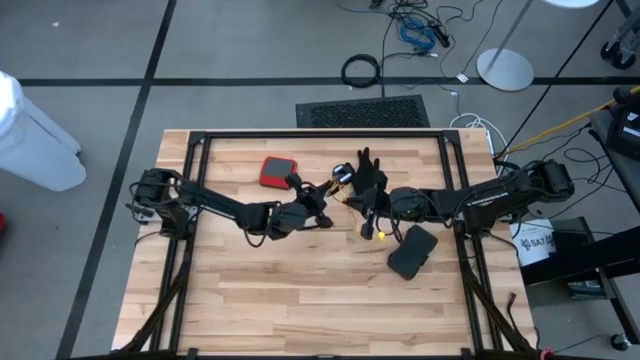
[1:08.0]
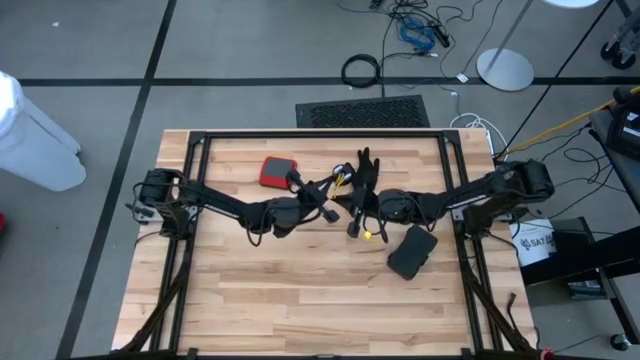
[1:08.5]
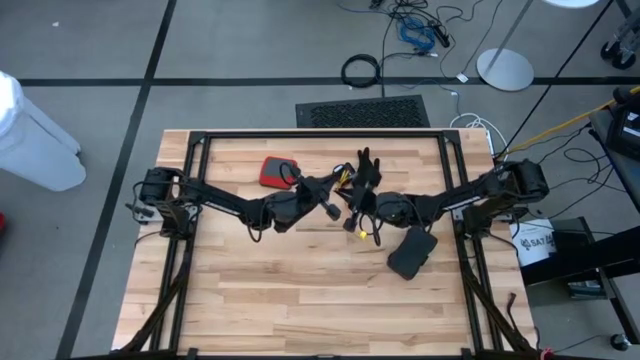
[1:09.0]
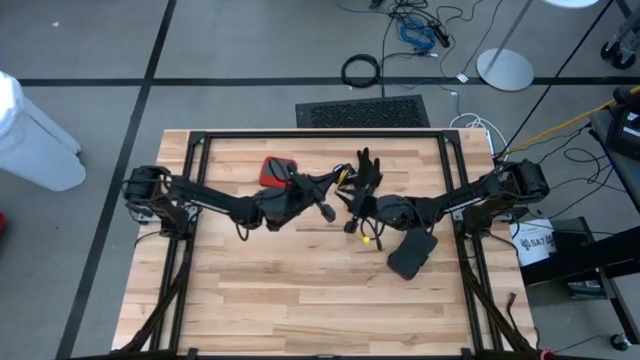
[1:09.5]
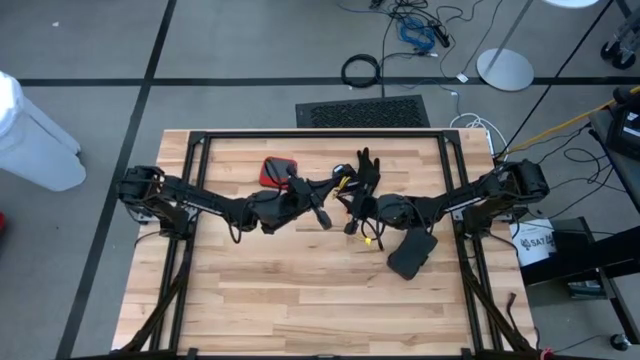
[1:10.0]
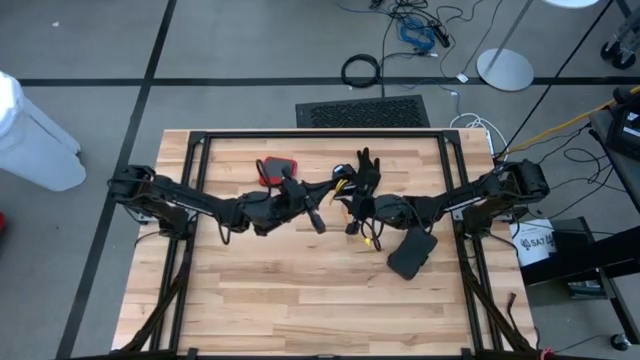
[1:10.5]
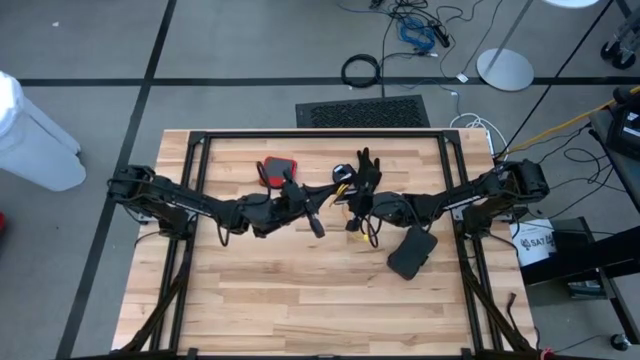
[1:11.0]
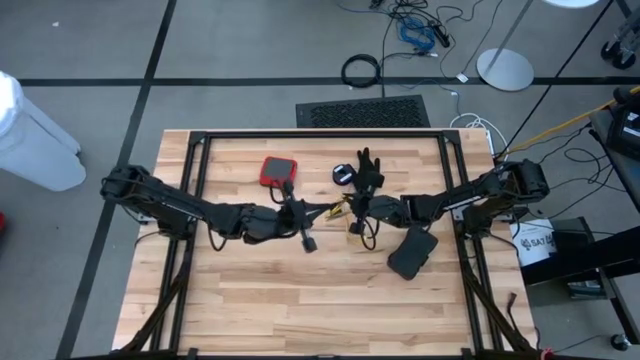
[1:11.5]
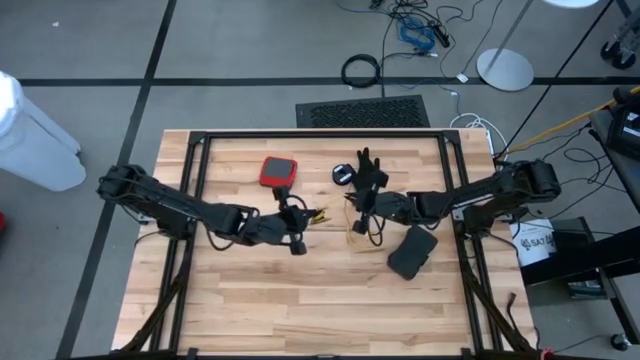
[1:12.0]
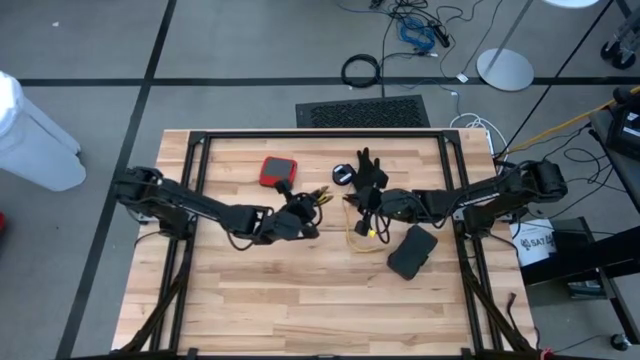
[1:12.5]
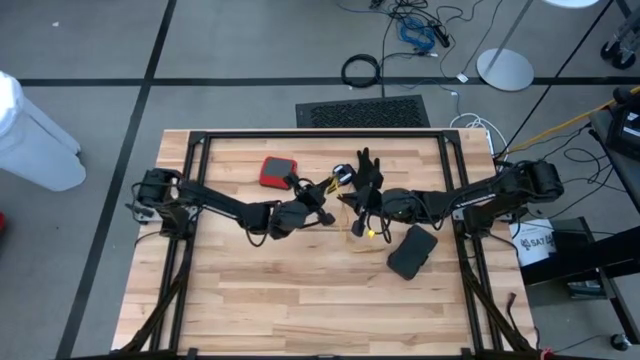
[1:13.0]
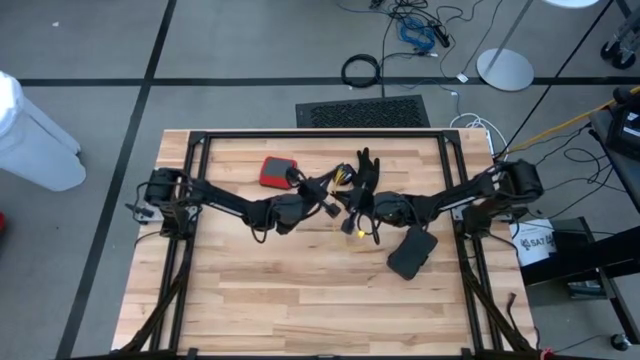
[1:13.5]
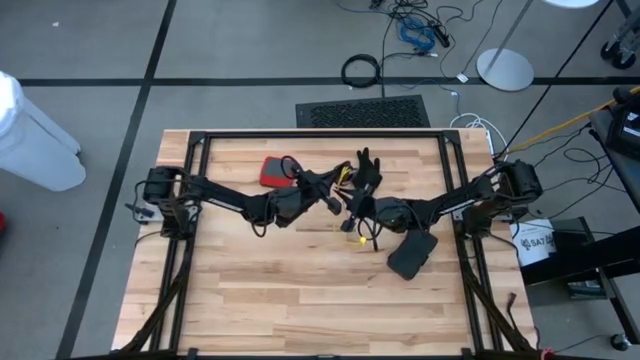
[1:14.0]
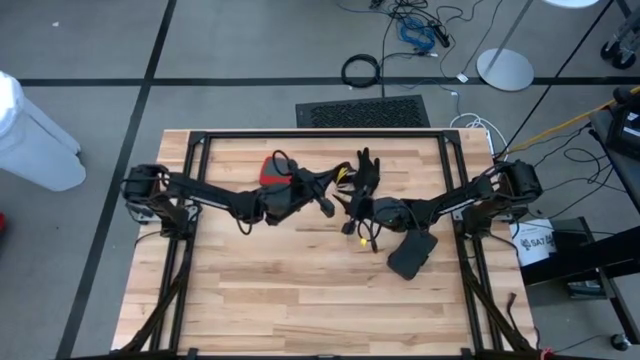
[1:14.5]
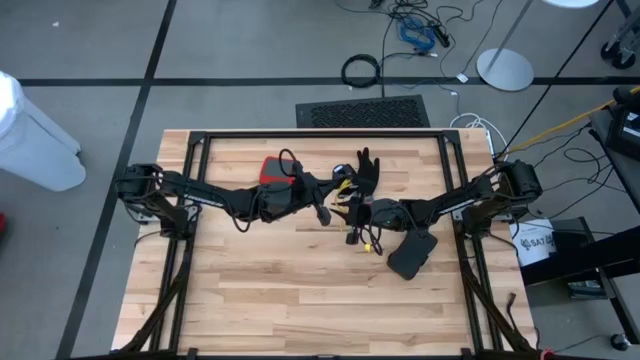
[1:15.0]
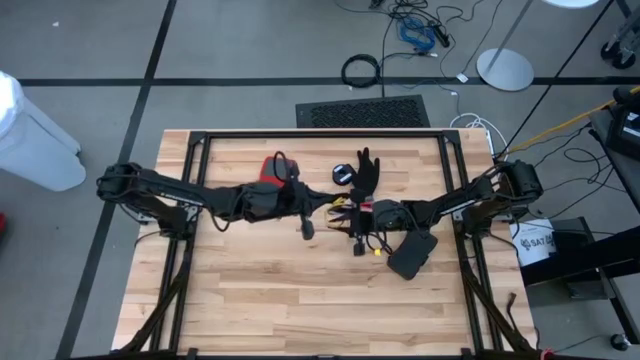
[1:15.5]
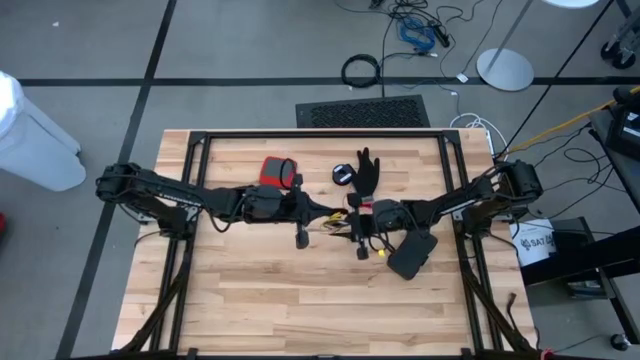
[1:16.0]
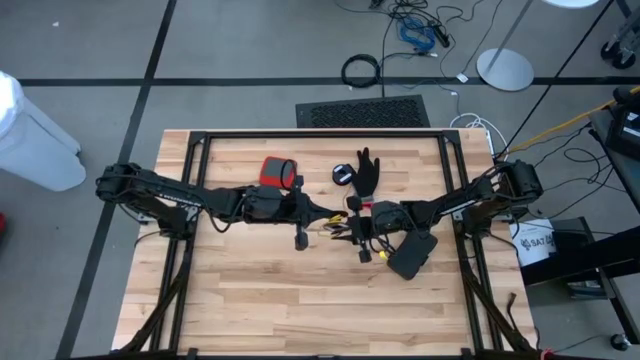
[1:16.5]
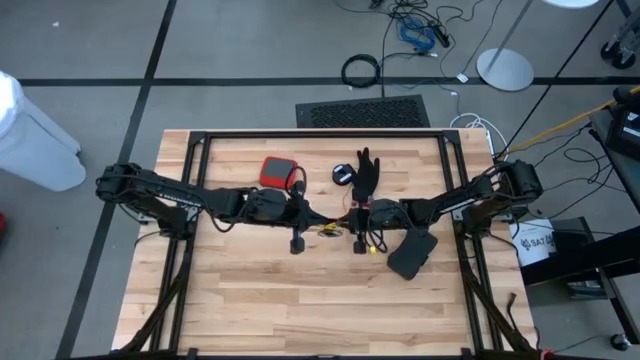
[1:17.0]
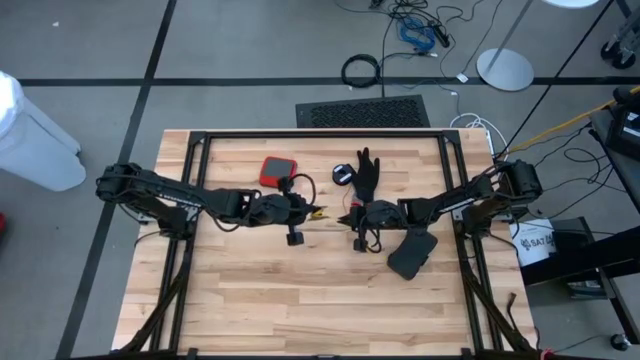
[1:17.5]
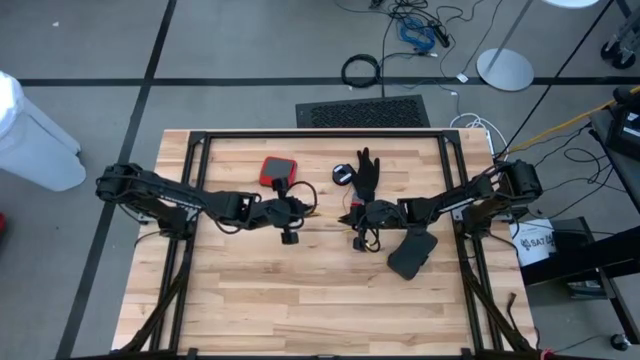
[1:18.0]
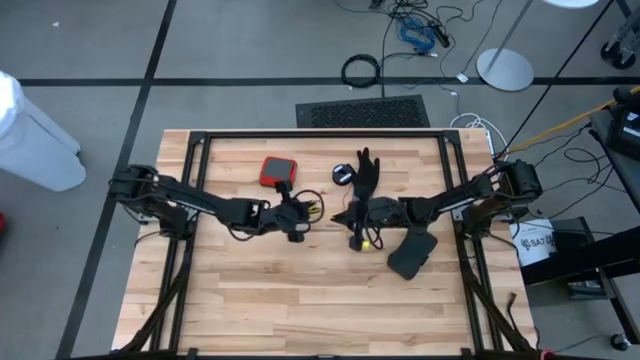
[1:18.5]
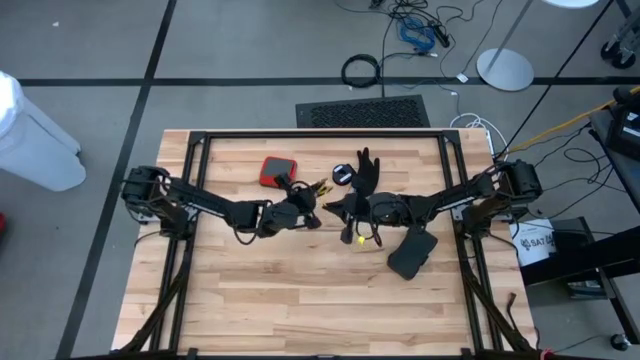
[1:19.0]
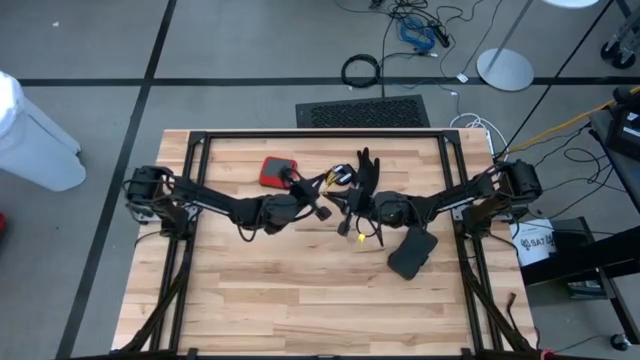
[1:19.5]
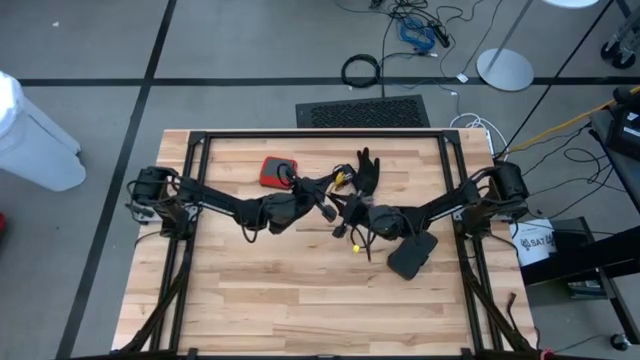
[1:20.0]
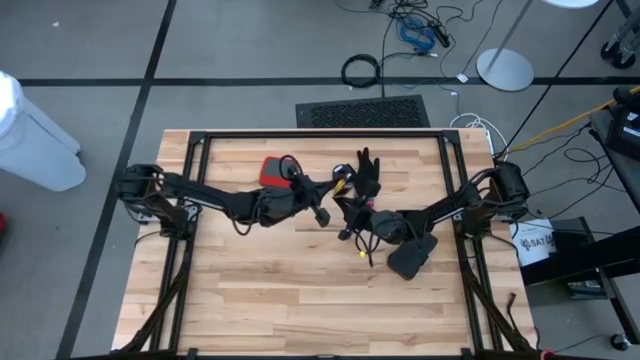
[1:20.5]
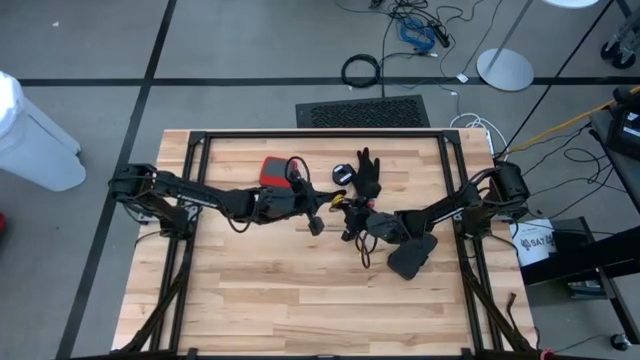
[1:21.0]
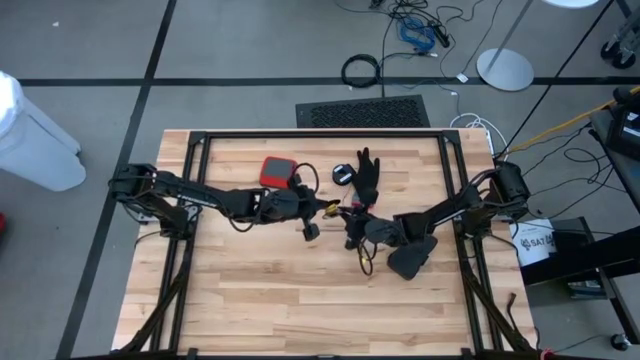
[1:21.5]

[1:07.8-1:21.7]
Task: Coil cords
Coil the yellow wire onto spool

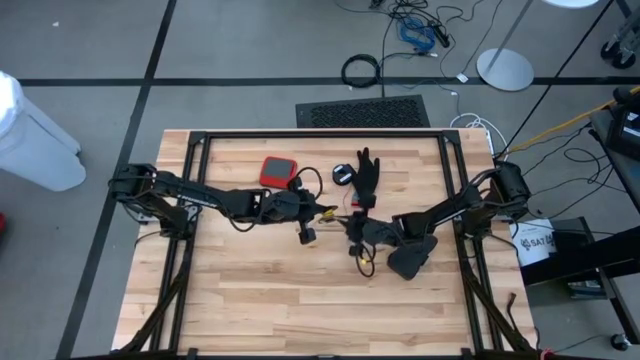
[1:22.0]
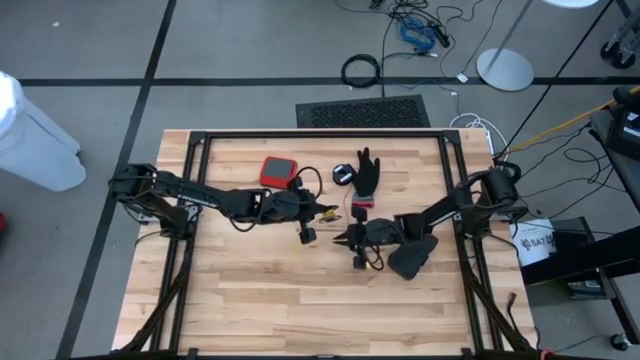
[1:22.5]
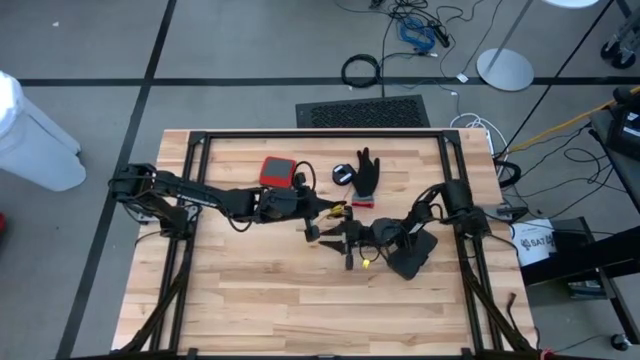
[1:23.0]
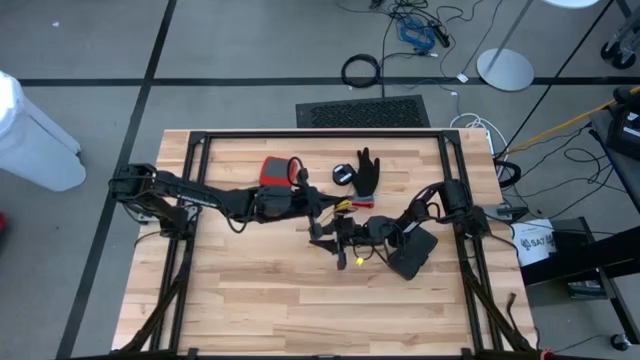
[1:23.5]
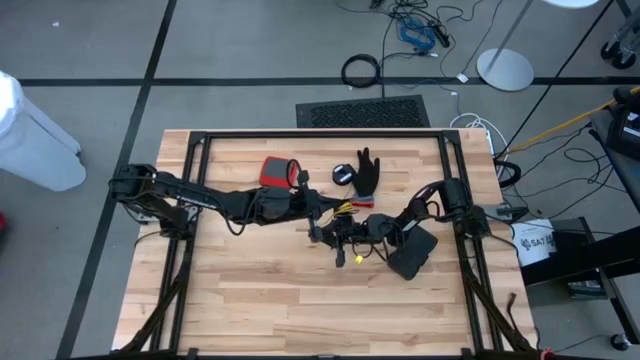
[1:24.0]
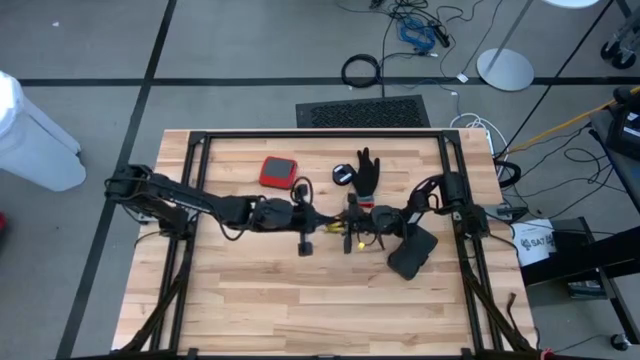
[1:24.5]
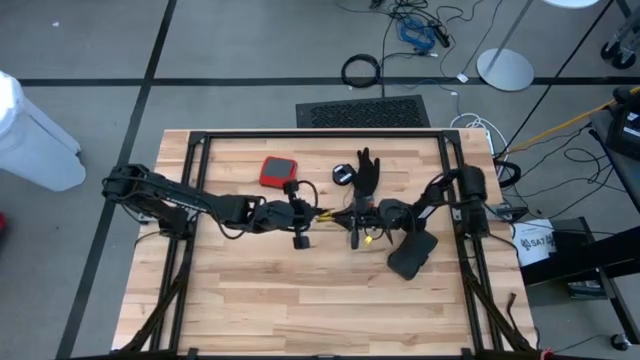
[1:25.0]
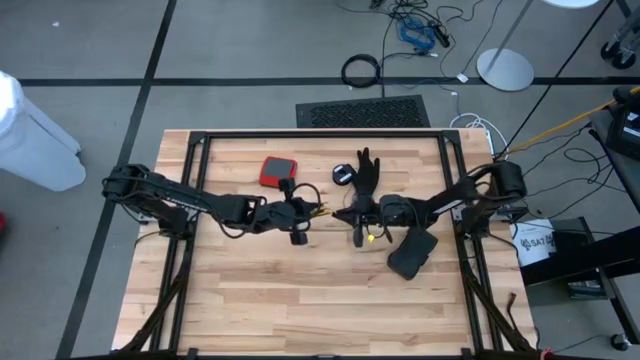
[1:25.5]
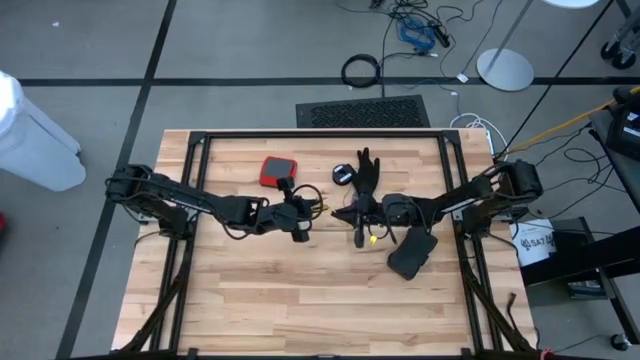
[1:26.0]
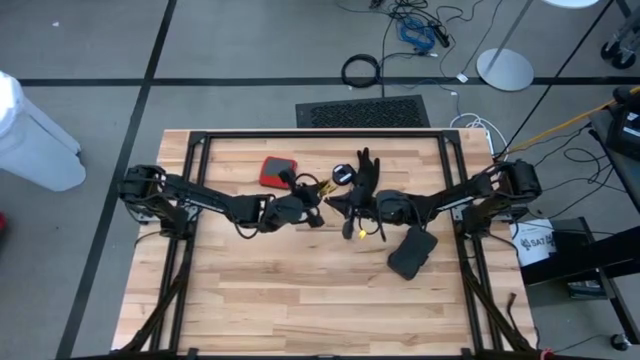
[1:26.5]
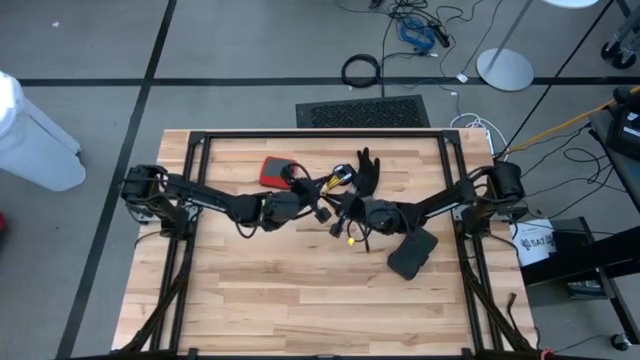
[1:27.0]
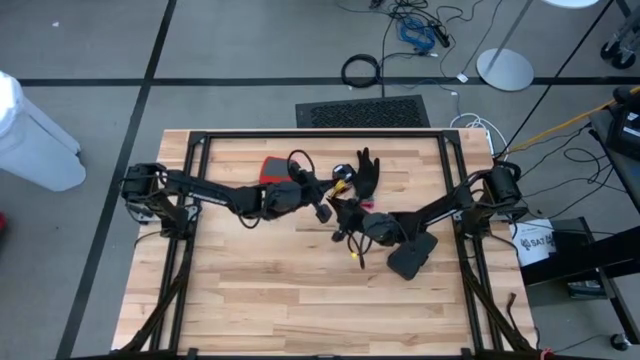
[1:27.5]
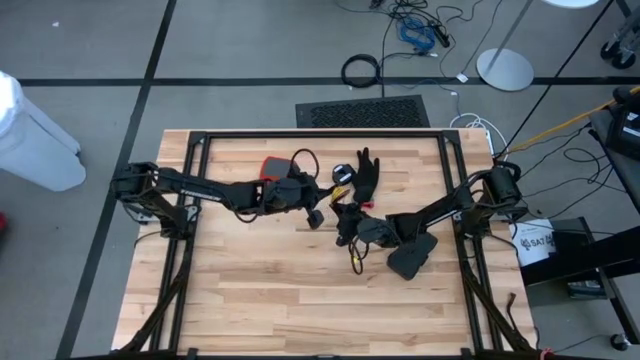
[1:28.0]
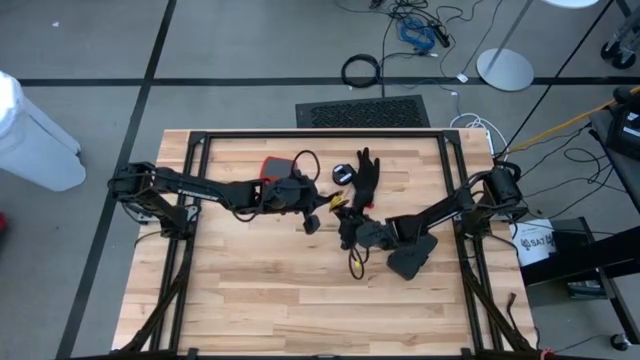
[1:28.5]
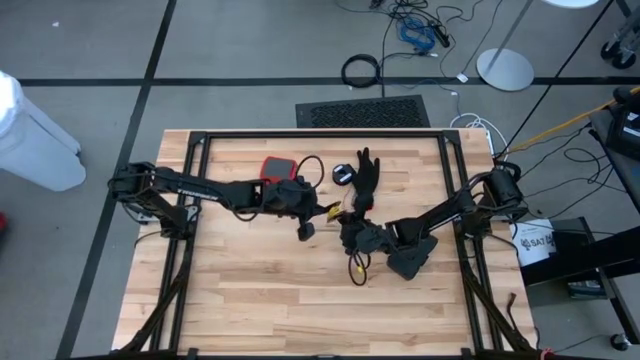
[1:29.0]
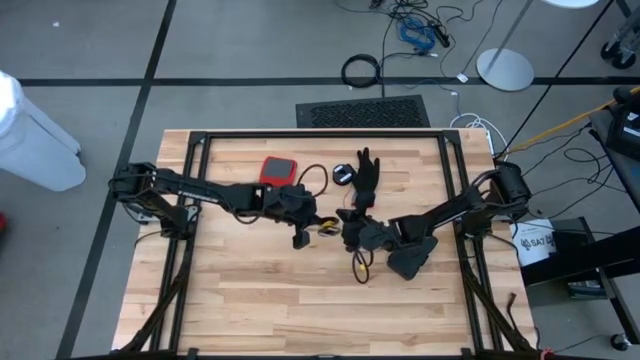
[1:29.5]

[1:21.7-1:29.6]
Coil the yellow wire onto spool
